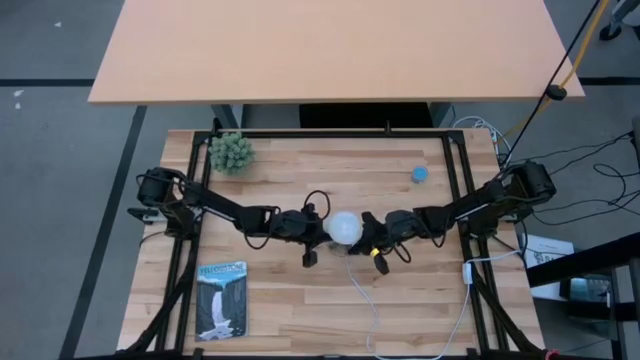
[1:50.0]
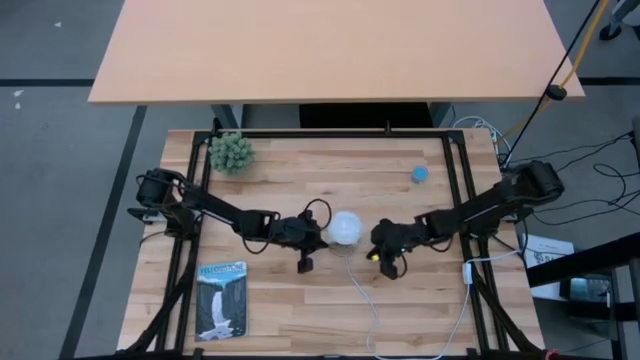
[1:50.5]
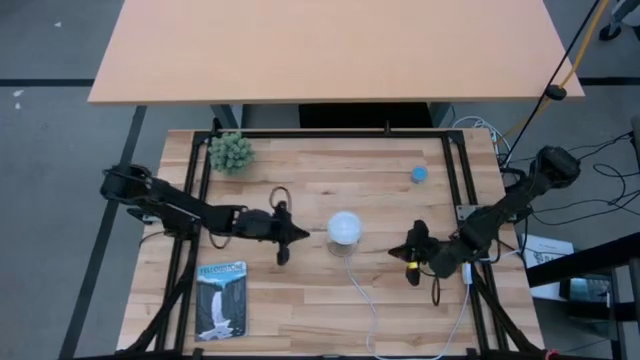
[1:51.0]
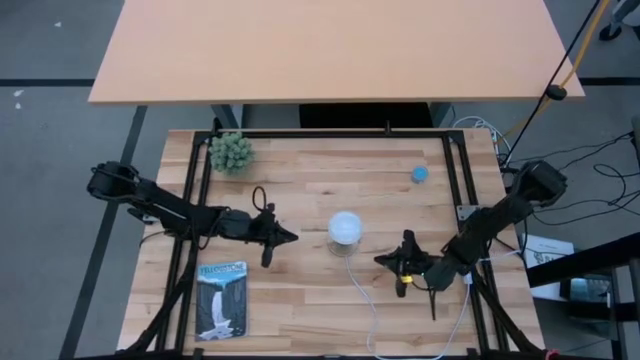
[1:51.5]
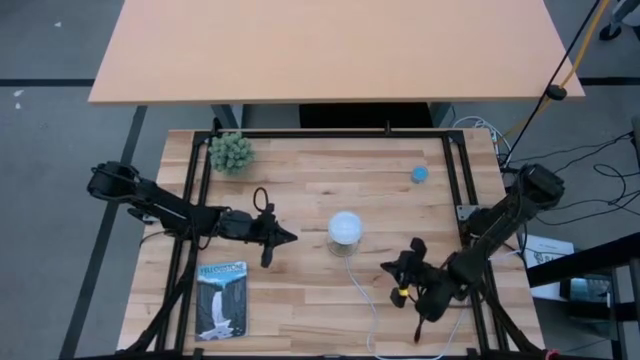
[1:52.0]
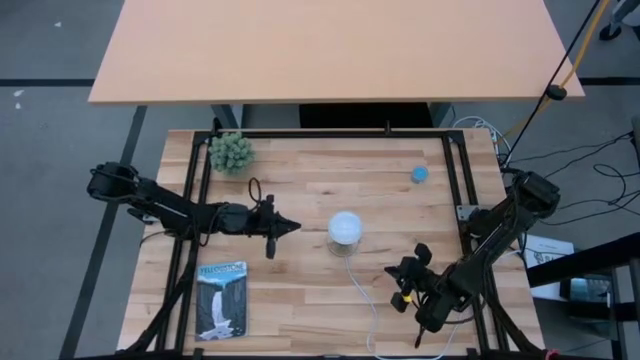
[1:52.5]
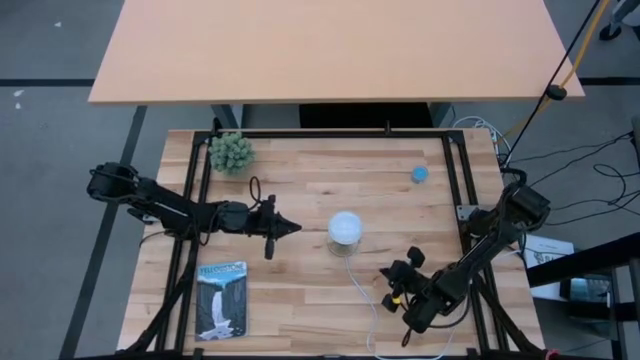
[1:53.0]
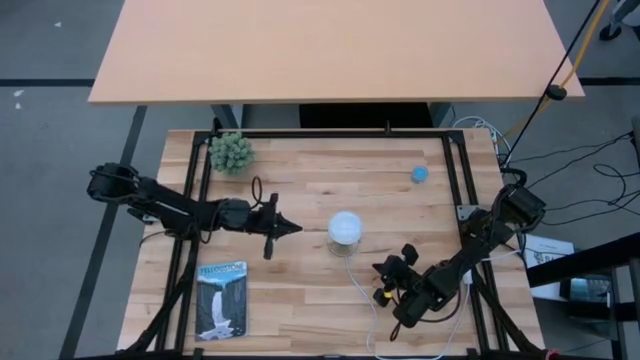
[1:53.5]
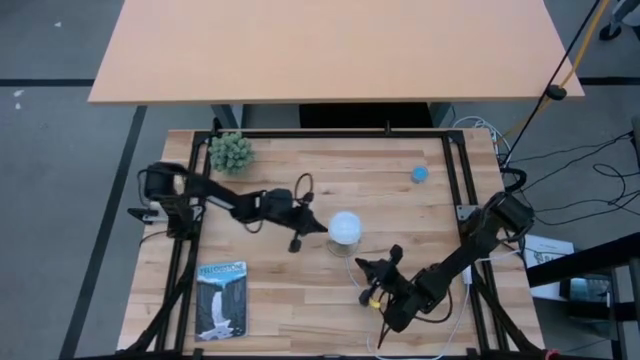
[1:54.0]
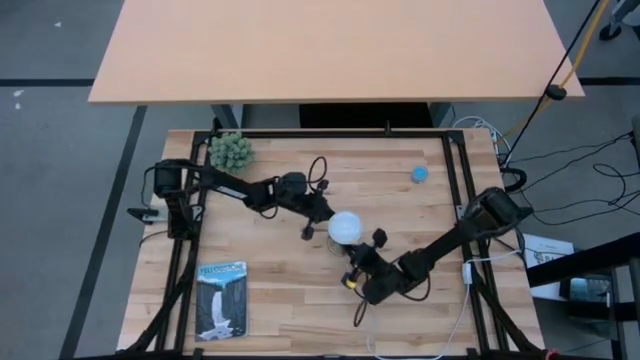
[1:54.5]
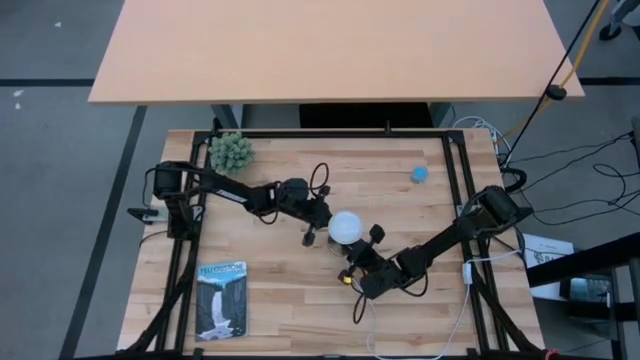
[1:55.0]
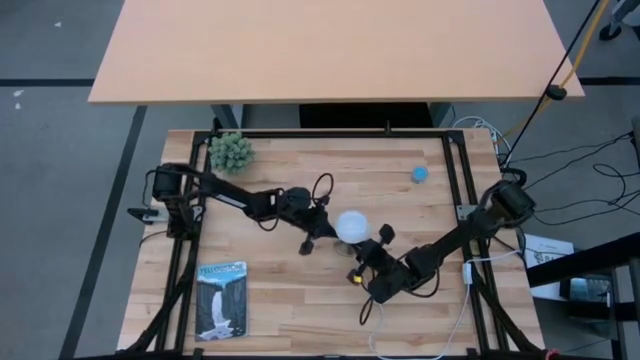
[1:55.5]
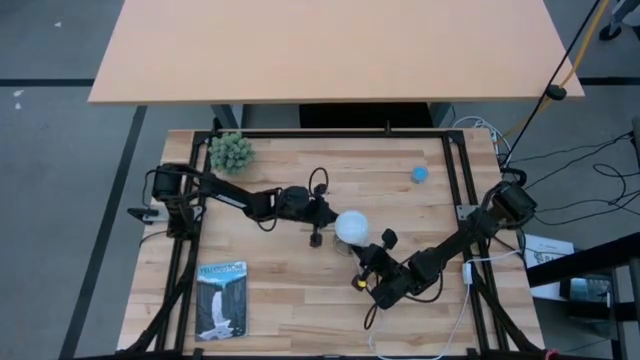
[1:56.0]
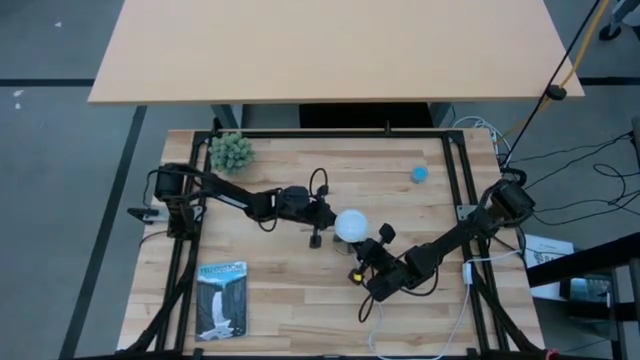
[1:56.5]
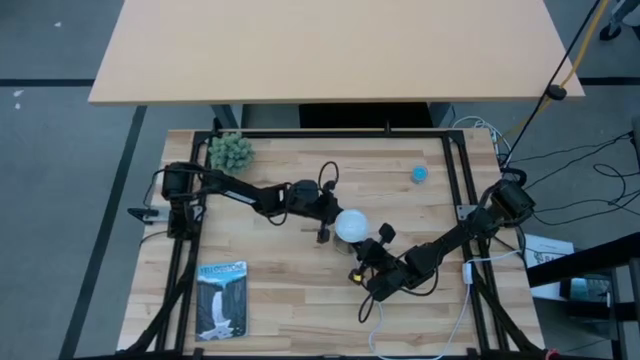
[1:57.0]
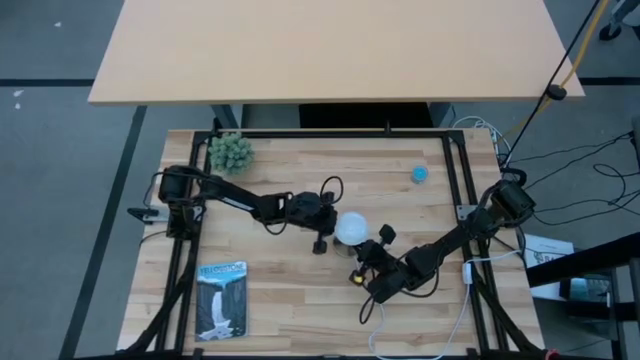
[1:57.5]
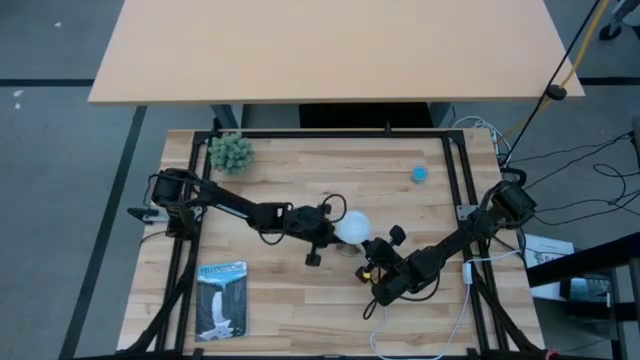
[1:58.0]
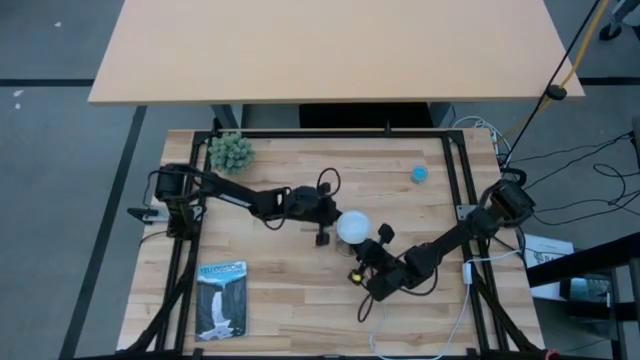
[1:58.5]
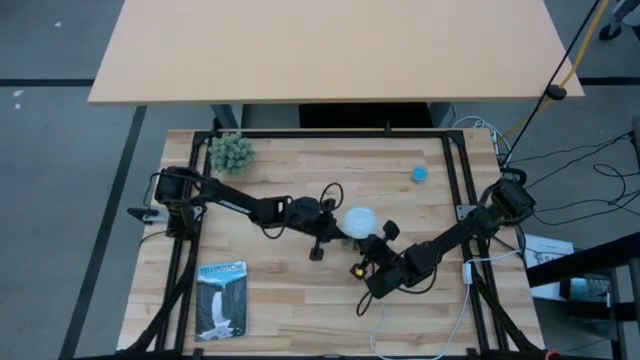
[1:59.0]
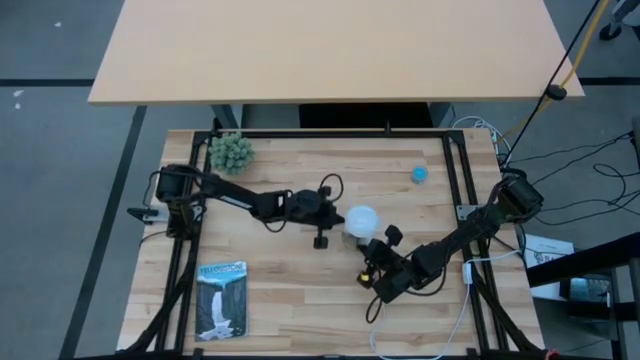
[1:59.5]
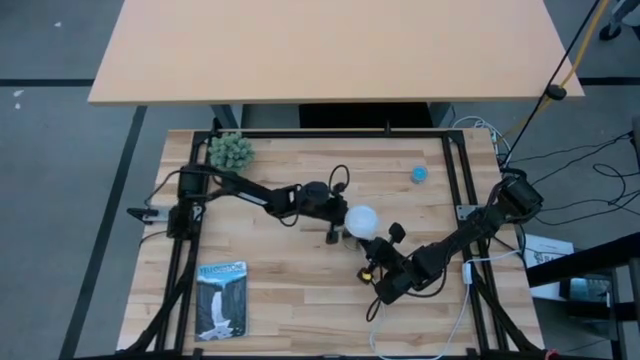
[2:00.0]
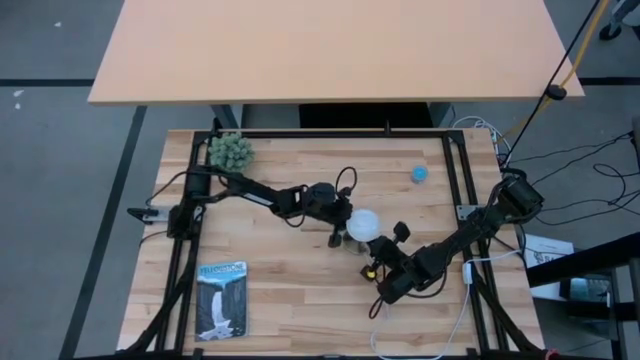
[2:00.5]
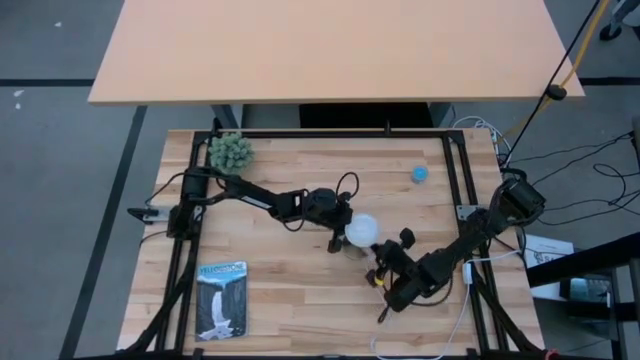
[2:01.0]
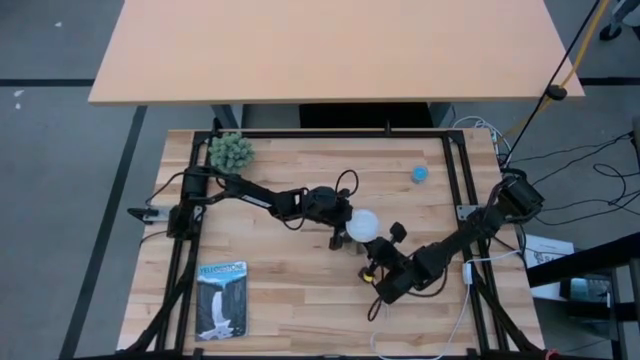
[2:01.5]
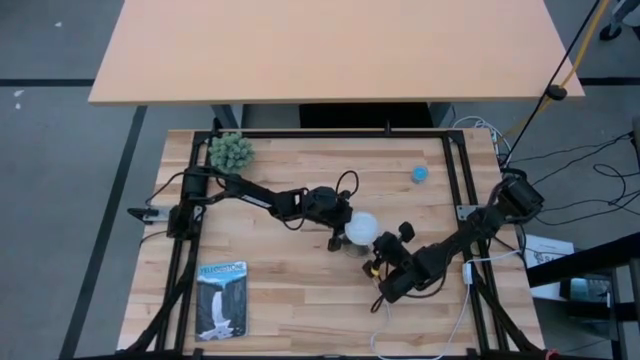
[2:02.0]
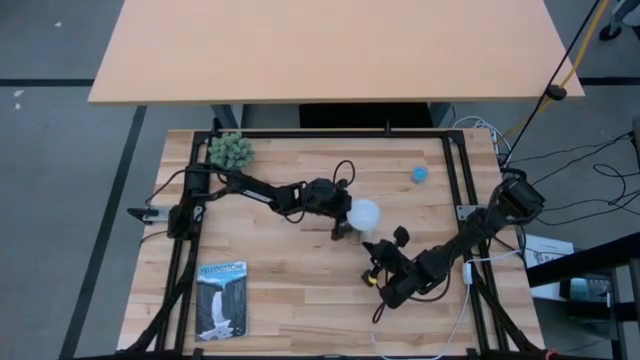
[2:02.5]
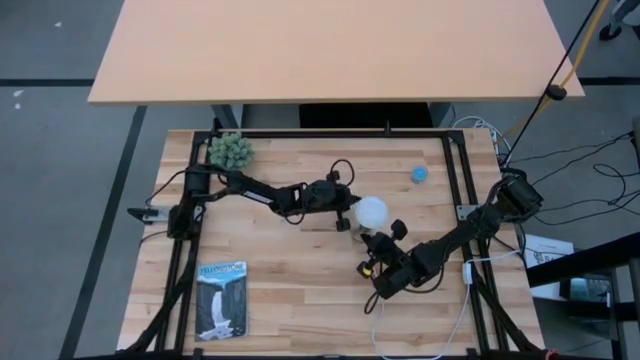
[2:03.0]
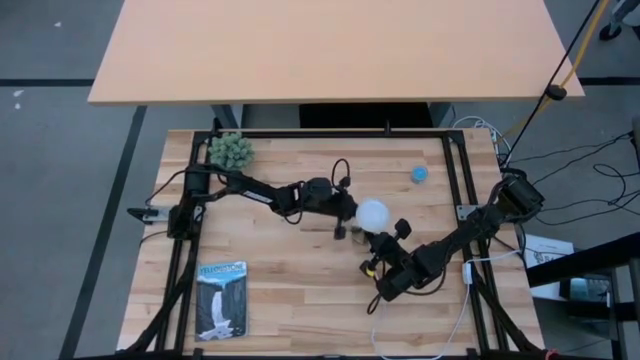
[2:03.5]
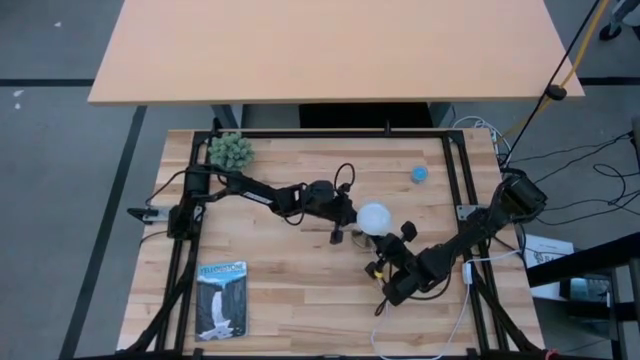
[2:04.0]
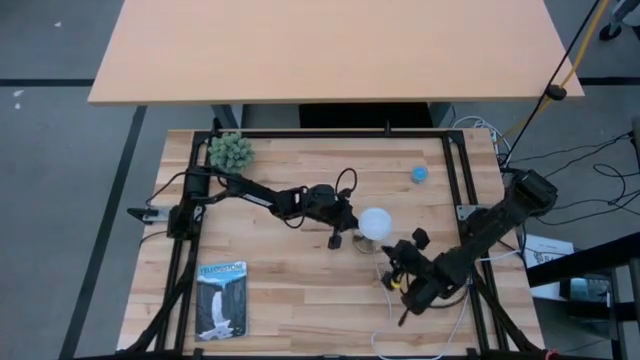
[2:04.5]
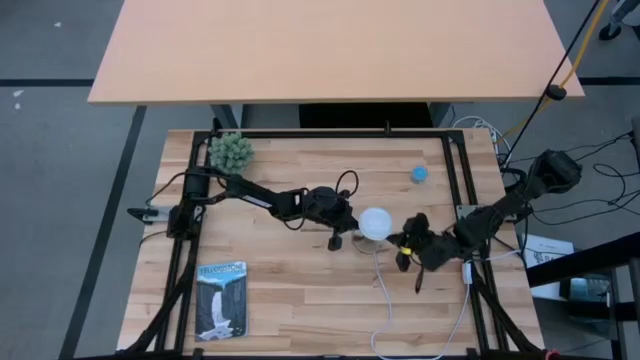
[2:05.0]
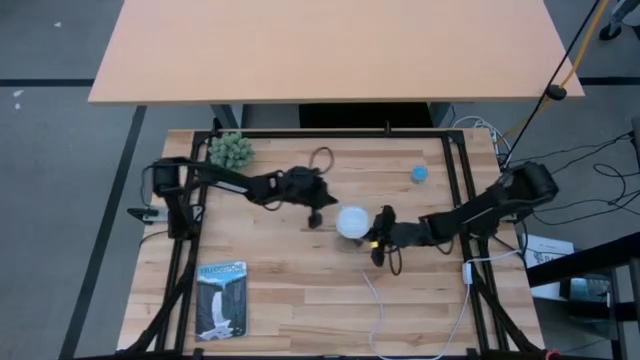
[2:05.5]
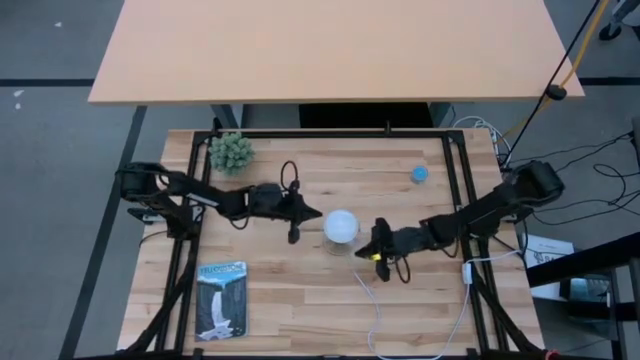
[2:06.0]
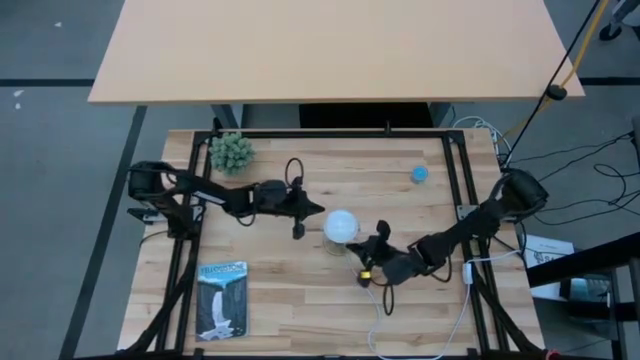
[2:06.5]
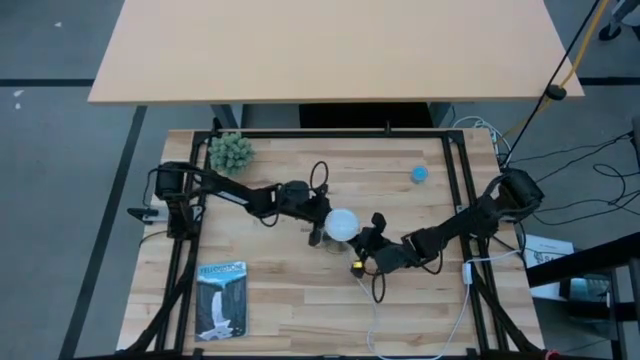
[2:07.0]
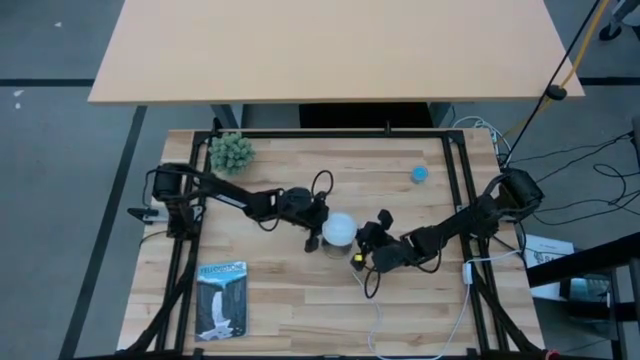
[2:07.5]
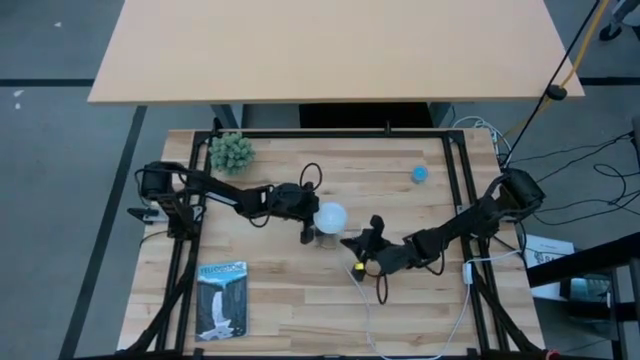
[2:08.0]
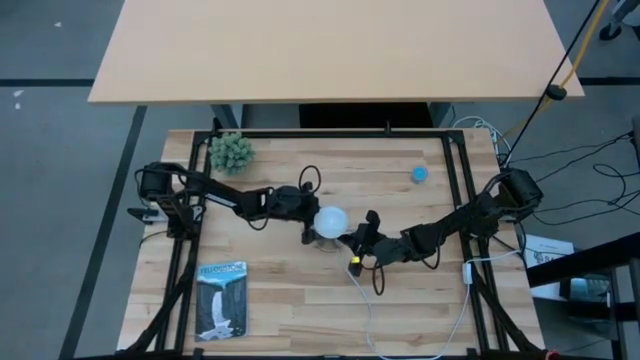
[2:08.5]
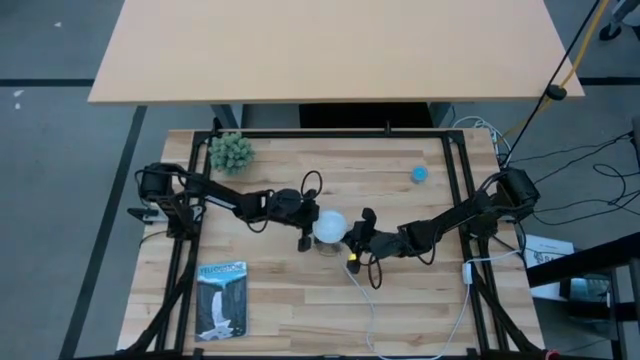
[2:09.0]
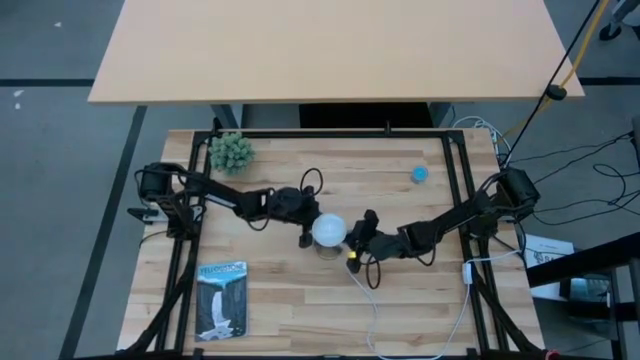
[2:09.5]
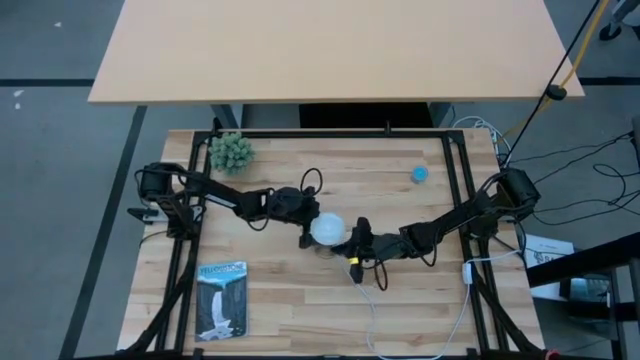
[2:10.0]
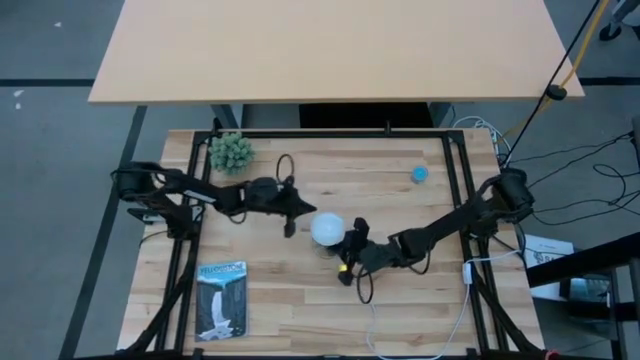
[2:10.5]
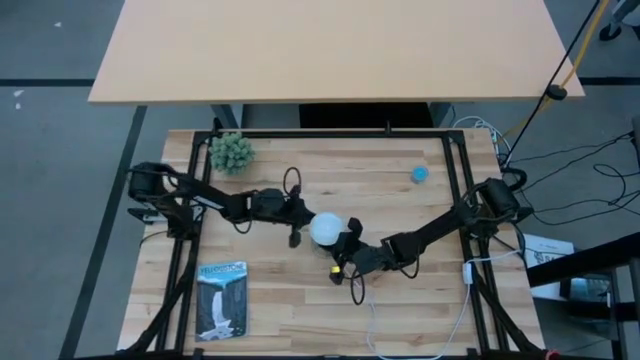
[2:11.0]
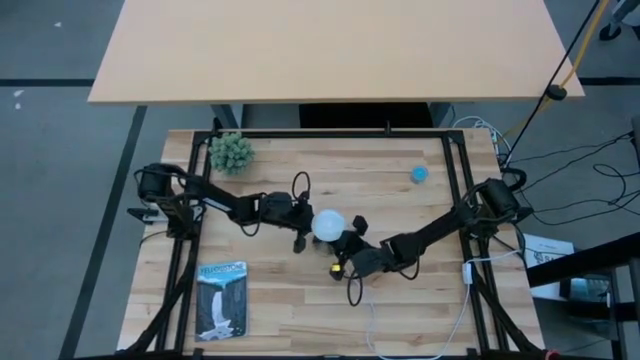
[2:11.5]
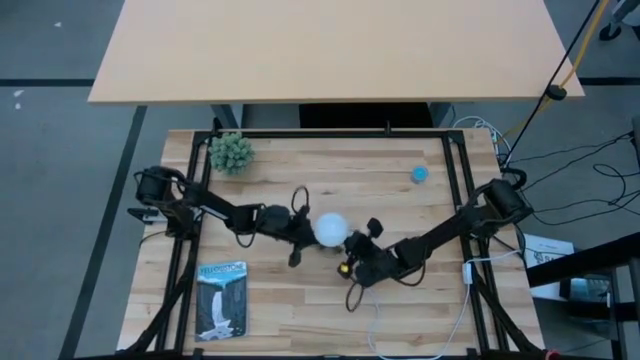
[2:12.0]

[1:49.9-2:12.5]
Task: Screw lightbulb
Remove the lightbulb from the lamp
